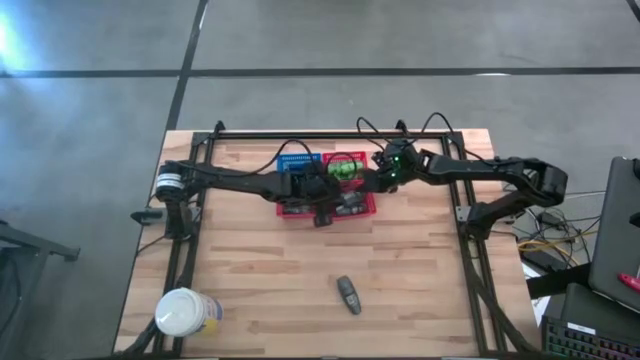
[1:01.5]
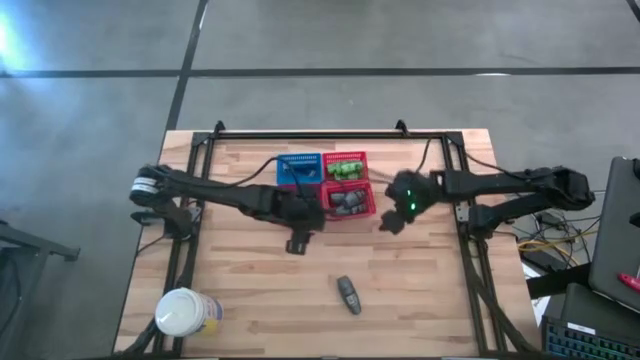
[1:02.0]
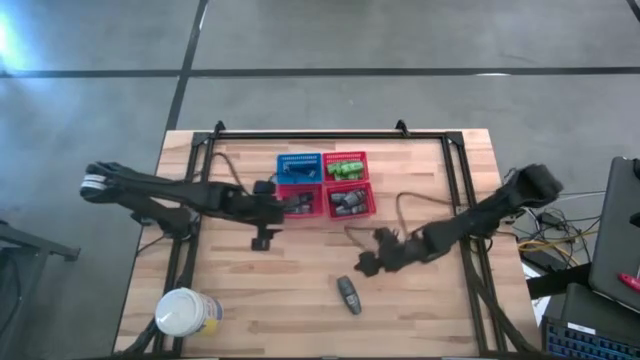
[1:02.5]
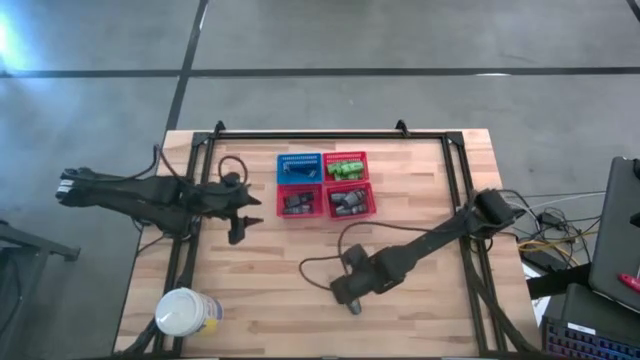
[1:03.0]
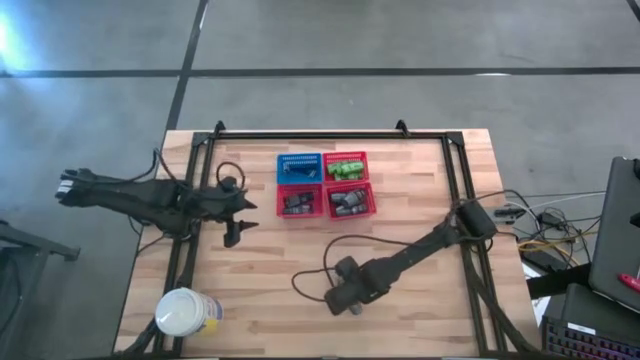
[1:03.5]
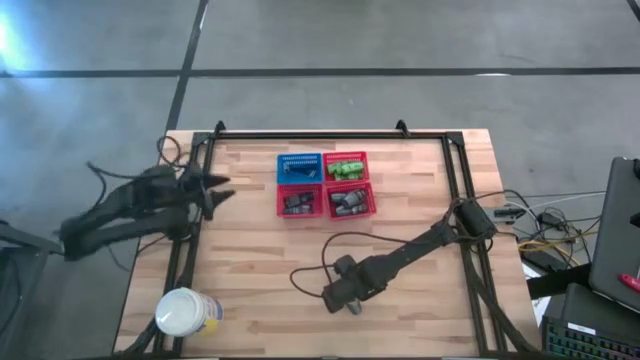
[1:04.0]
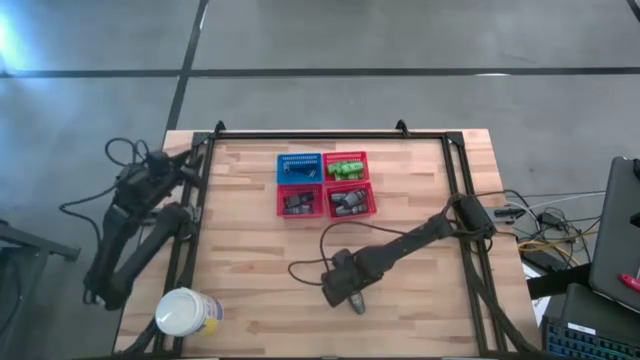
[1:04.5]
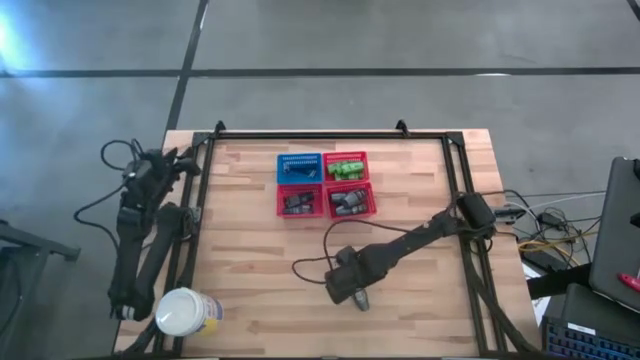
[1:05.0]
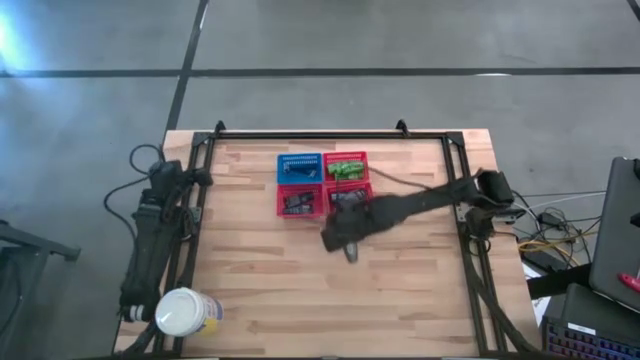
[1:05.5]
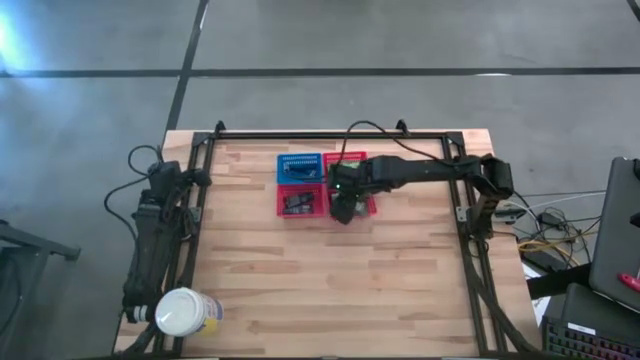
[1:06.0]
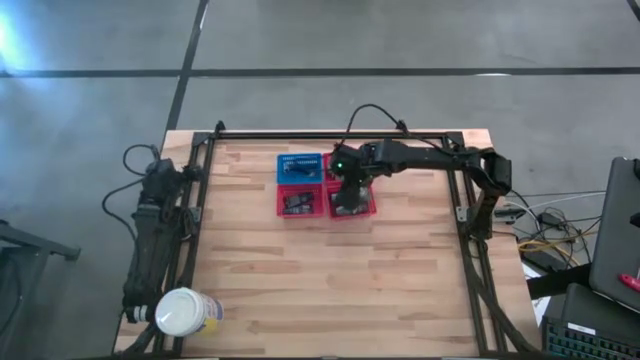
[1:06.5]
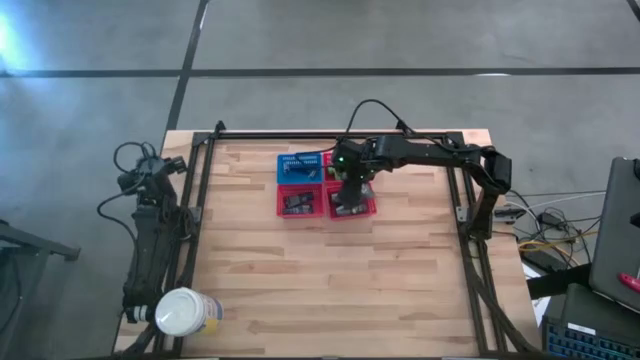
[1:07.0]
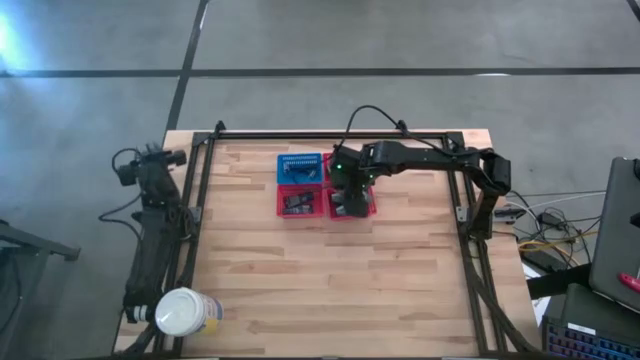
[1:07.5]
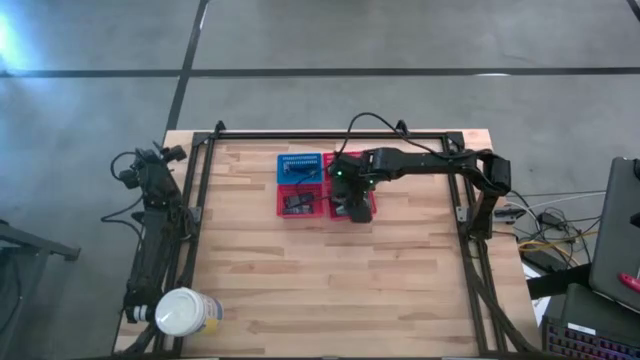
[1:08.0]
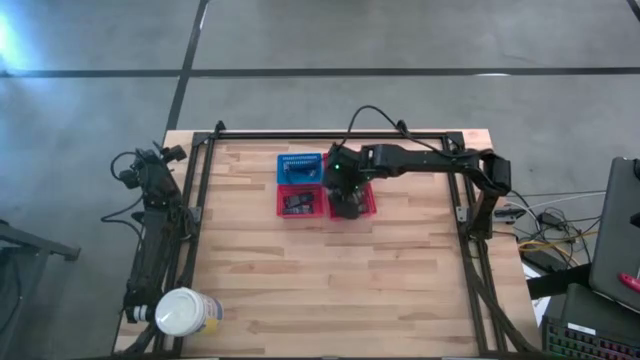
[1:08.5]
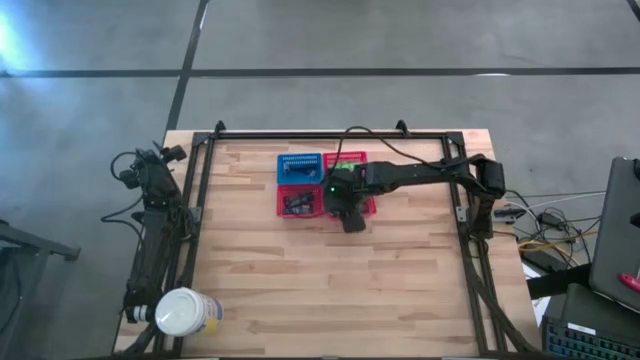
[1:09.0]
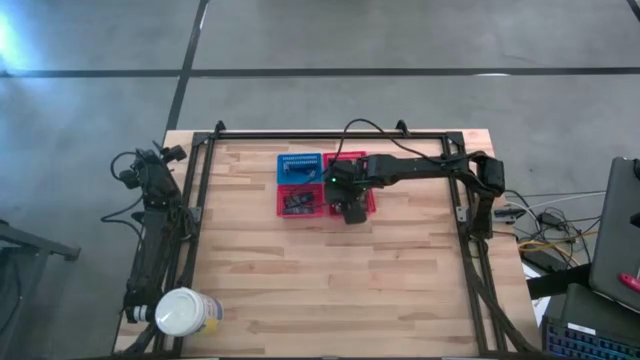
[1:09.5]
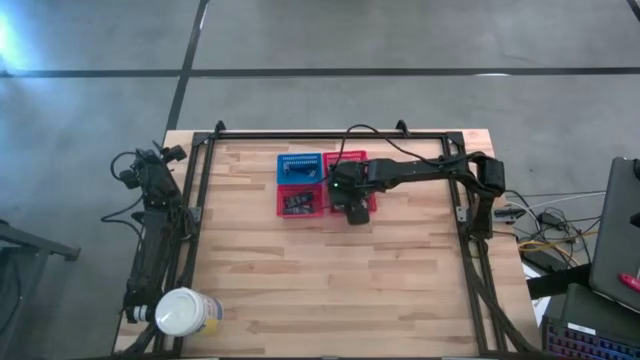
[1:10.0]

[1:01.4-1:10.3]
Task: Pick & Place Travel size toiletries
Put the deodorant into the bottom right red bin

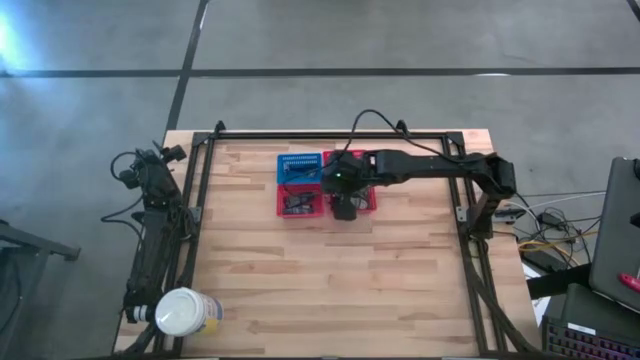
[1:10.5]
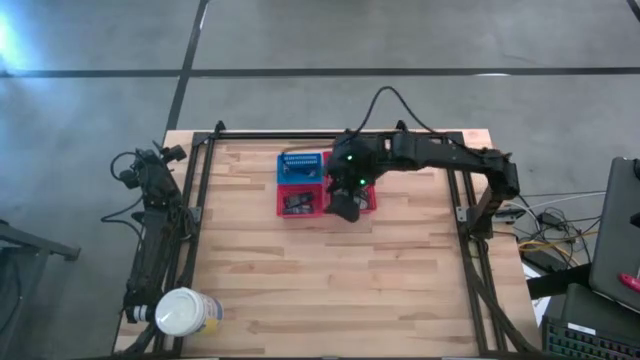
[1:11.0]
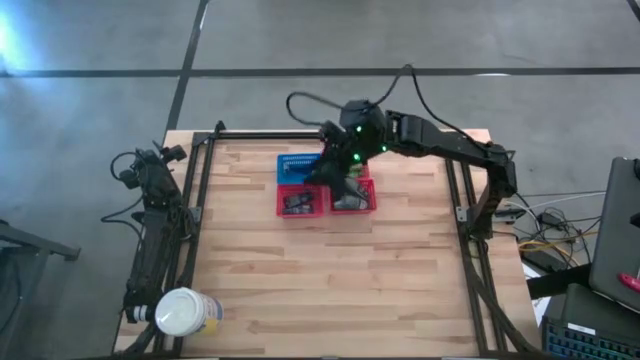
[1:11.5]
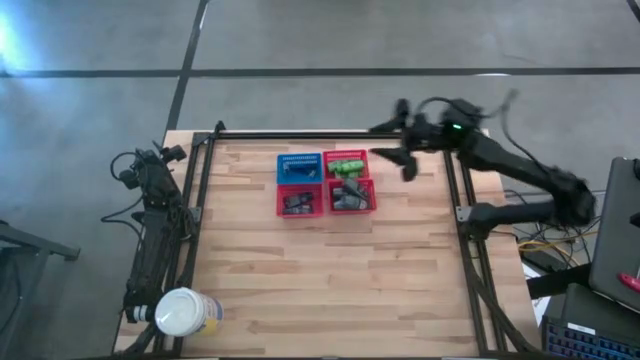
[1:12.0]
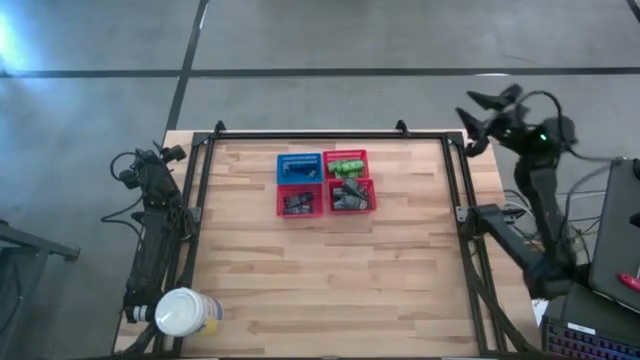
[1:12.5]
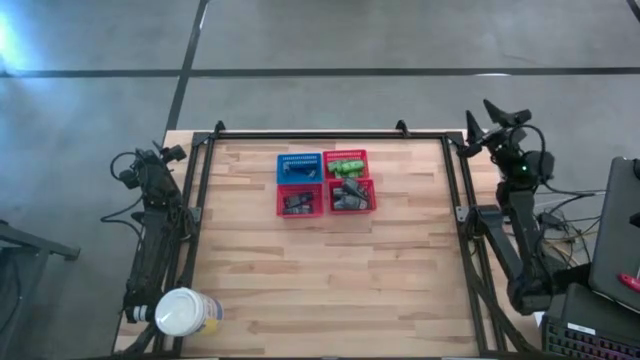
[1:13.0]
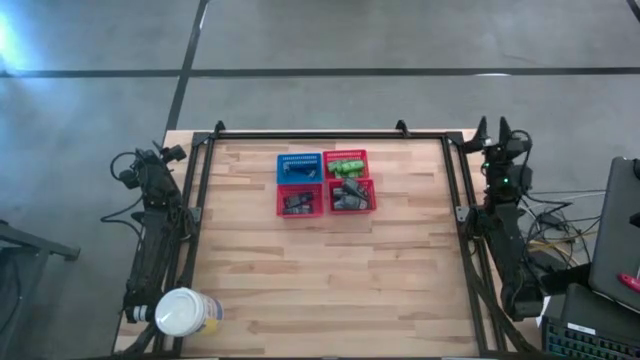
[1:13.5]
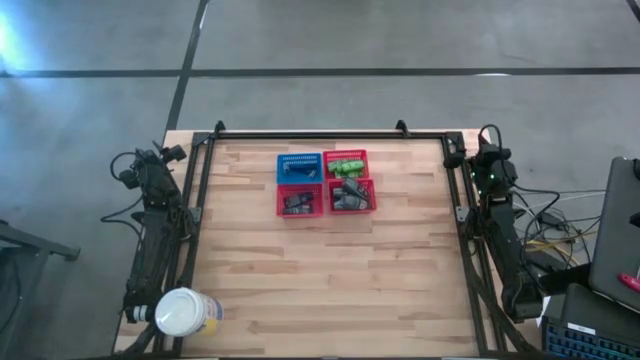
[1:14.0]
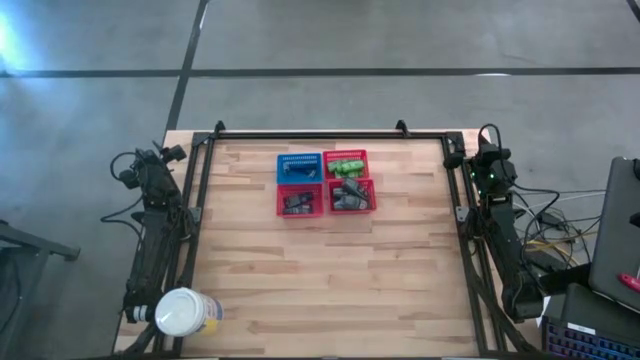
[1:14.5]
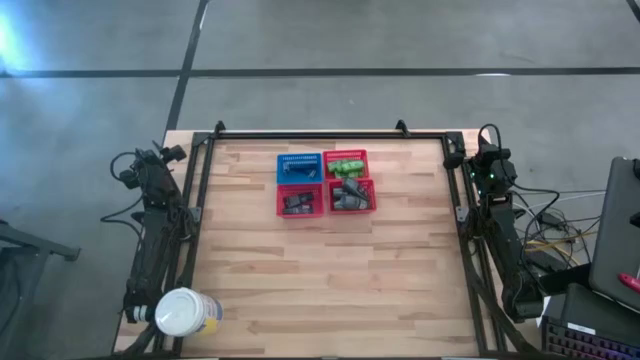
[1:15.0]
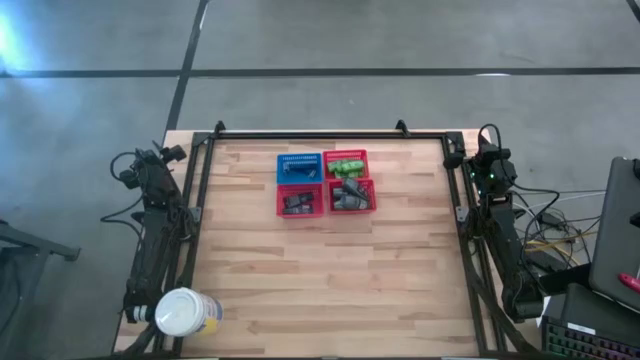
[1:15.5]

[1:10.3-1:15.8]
Return to Home Position

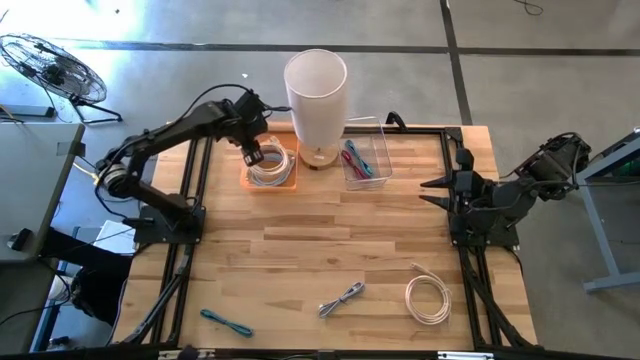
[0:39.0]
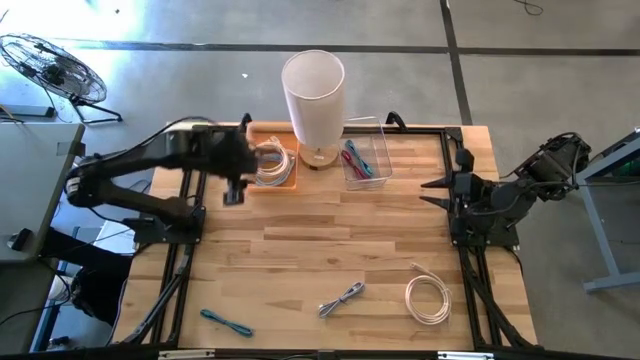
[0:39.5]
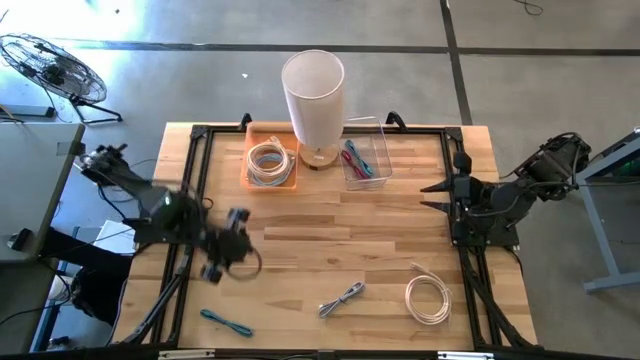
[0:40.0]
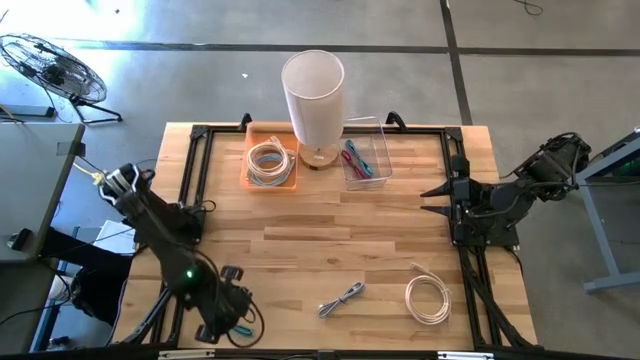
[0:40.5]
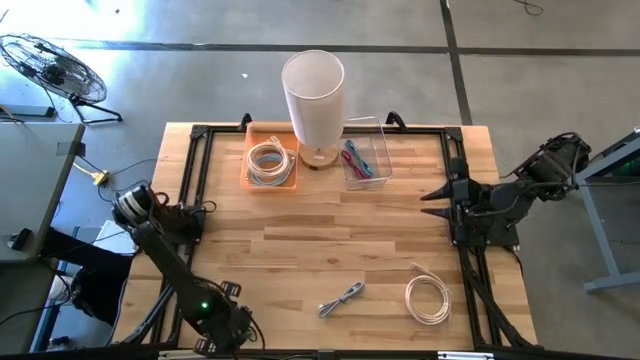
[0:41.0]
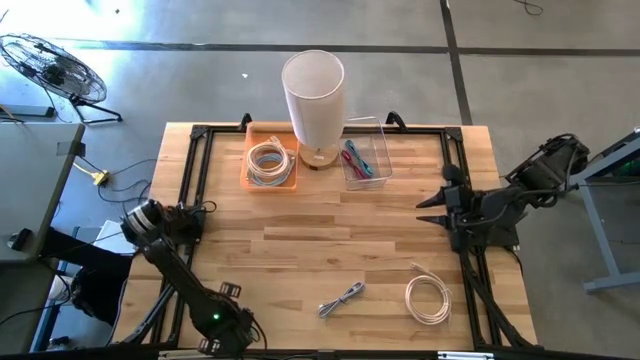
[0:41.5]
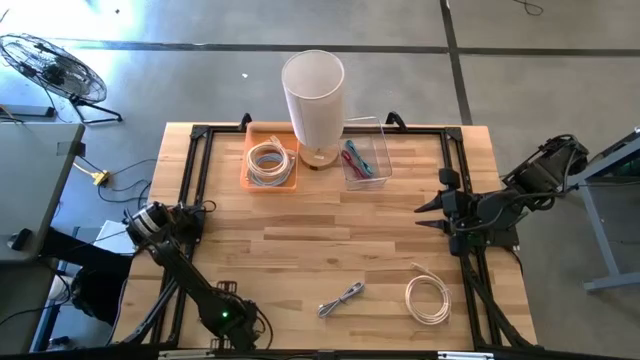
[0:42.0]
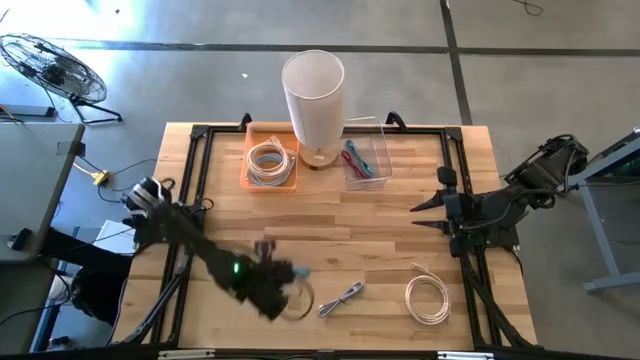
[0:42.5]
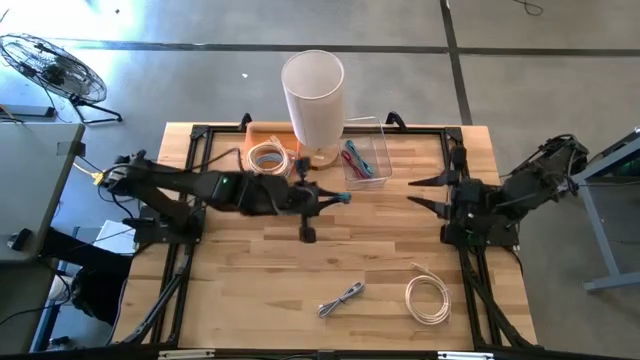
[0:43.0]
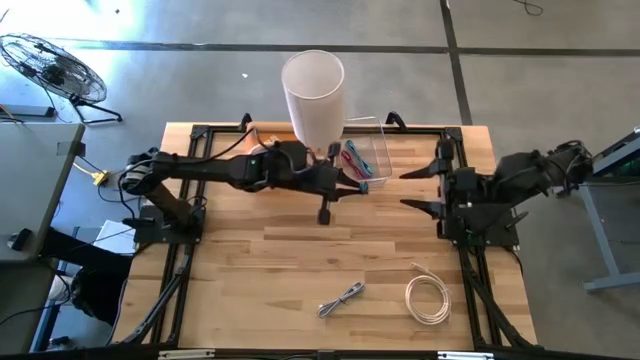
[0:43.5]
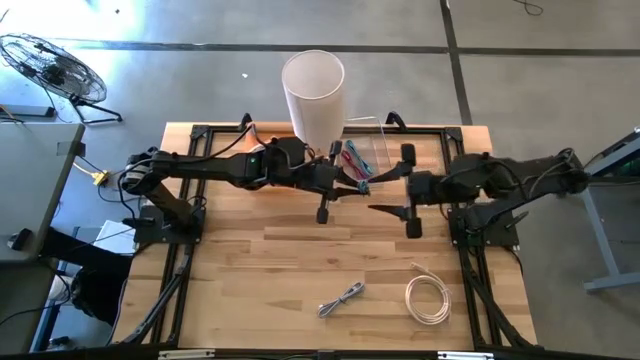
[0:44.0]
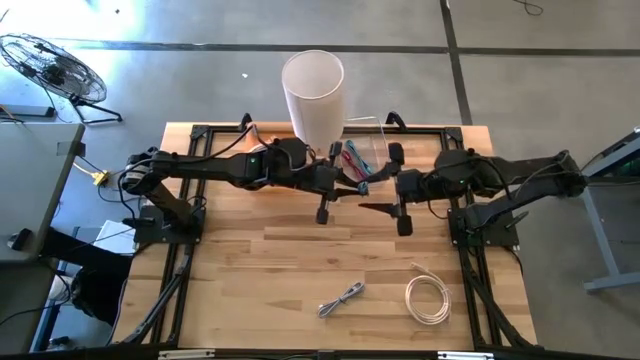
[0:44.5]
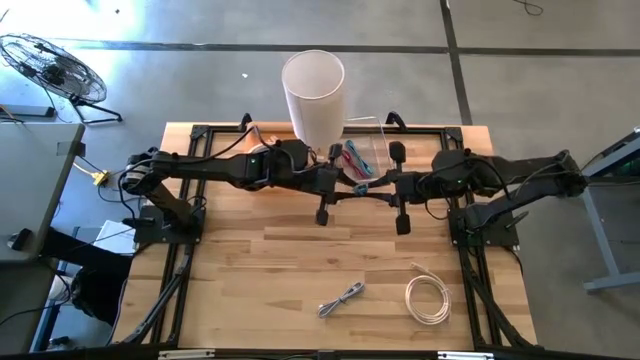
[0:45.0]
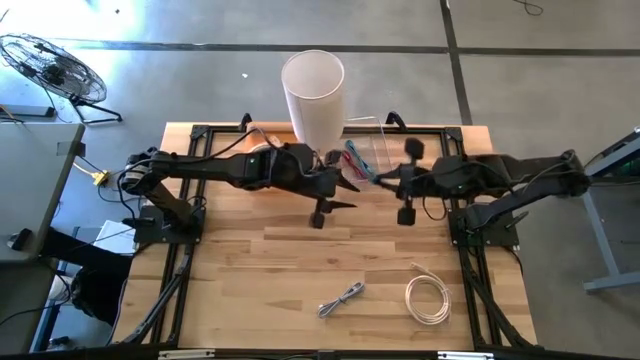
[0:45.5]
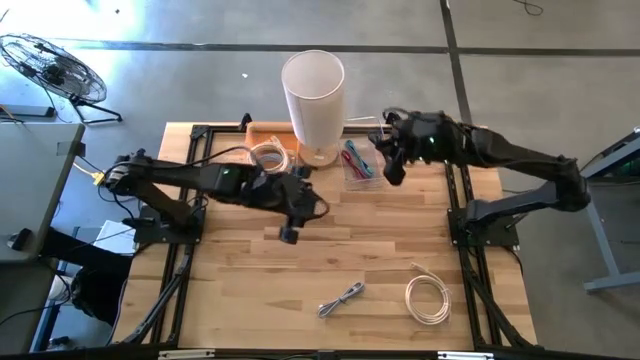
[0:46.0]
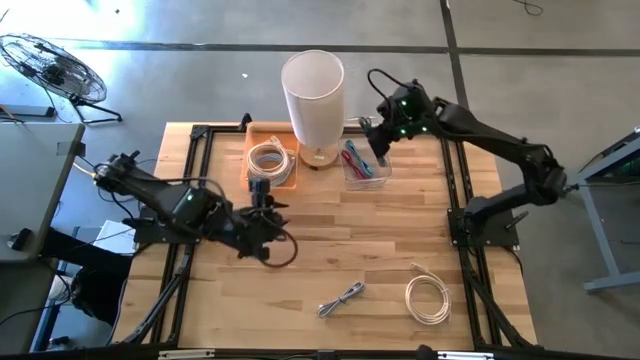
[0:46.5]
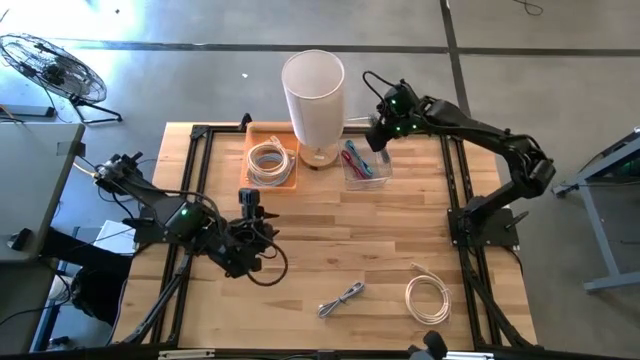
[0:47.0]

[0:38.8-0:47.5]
Task: Pick & Place USB Port
Put the blue USB cable into the transparent bin
